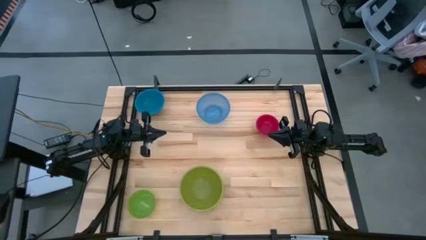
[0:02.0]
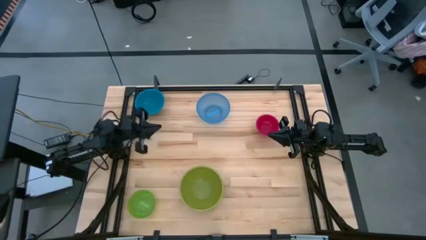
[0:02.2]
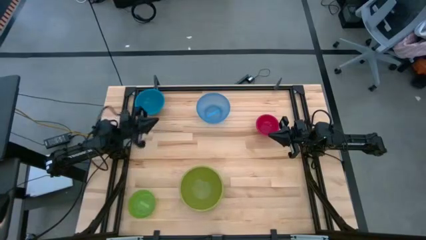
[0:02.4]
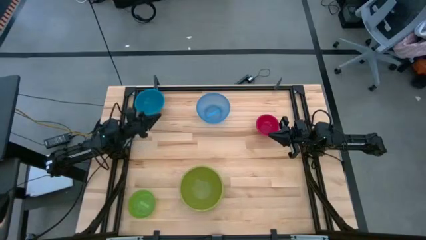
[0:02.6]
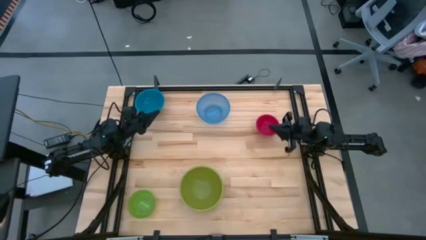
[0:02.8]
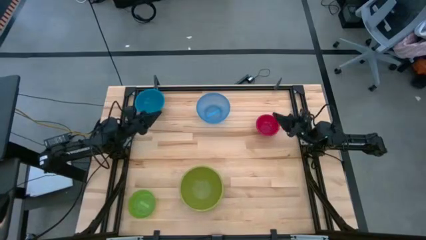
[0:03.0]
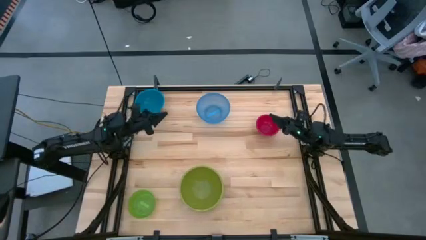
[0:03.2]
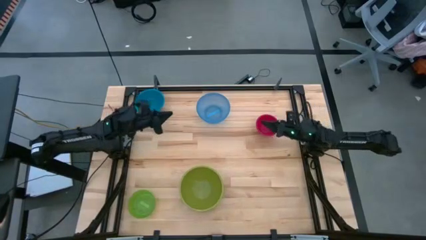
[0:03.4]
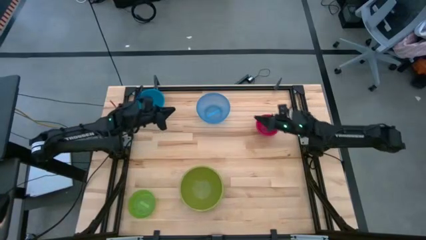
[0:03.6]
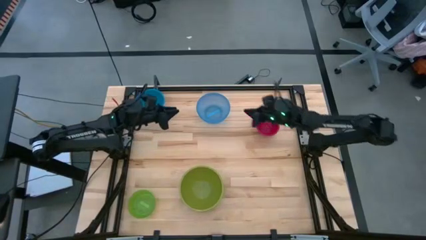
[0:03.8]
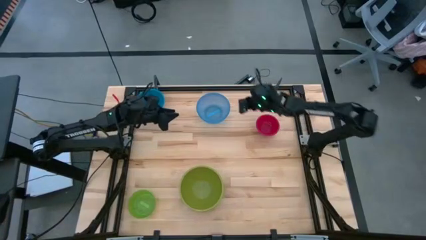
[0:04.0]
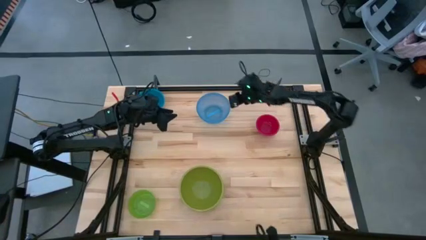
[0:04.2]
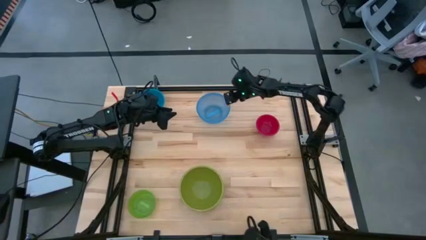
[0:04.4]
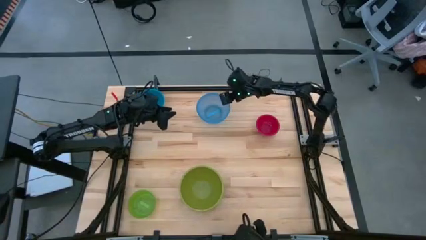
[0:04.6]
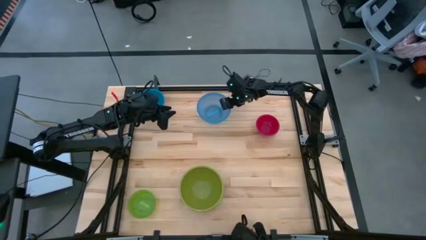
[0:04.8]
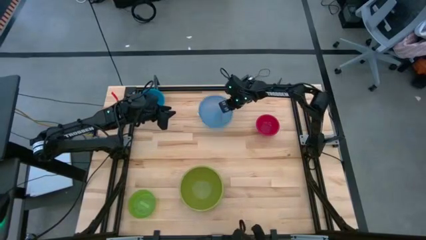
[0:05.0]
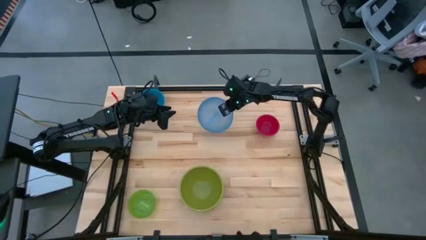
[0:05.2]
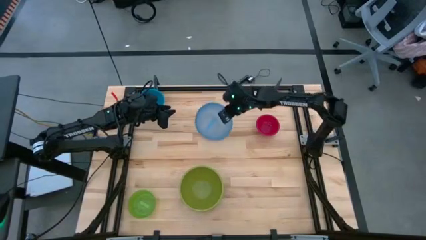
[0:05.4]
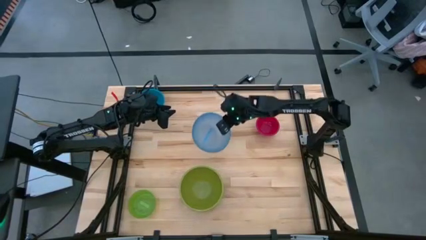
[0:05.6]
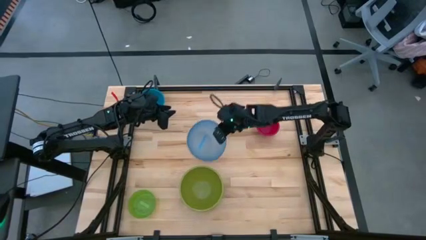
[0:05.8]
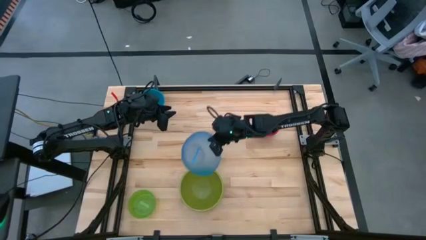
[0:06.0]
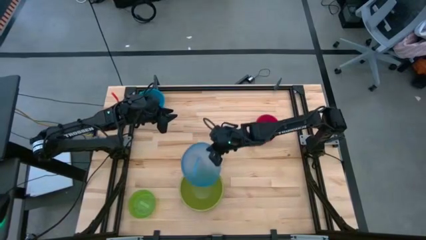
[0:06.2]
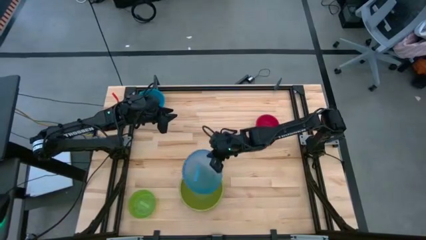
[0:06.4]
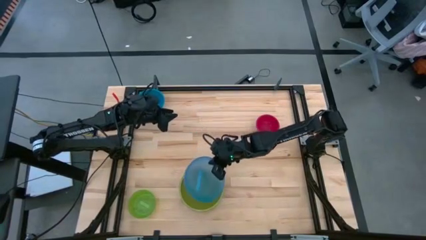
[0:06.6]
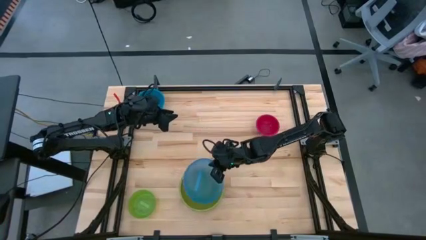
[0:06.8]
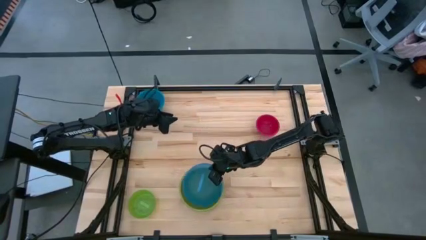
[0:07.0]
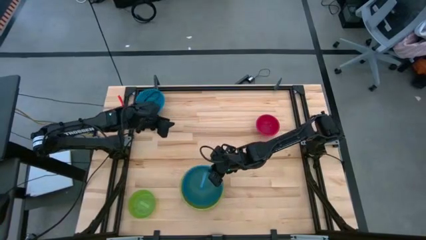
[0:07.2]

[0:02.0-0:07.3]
Stack the blue bowl into the green bowl

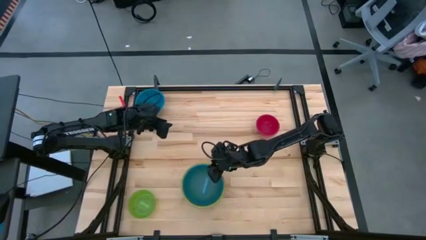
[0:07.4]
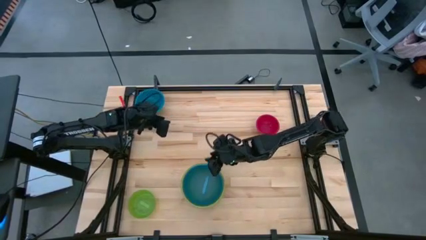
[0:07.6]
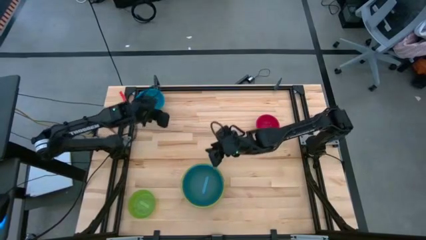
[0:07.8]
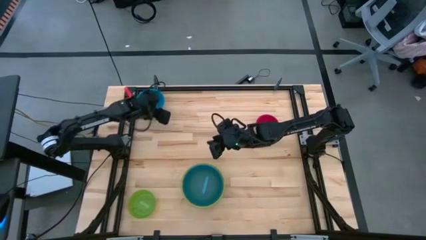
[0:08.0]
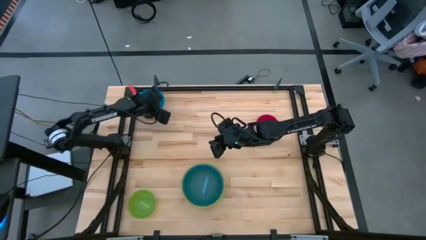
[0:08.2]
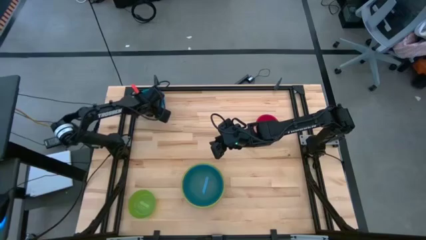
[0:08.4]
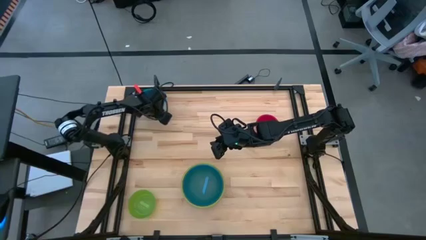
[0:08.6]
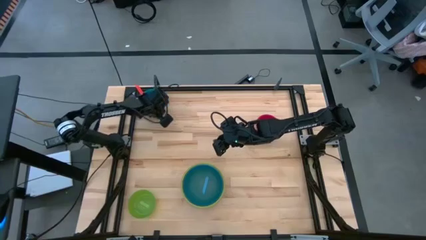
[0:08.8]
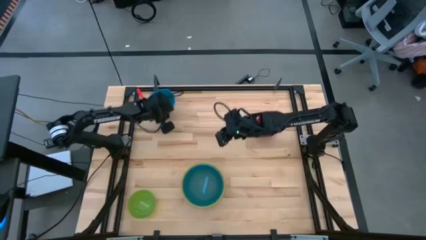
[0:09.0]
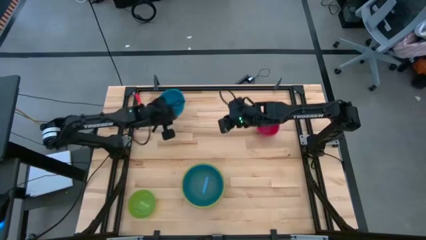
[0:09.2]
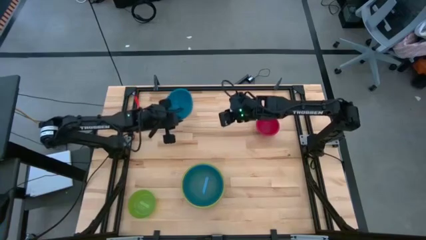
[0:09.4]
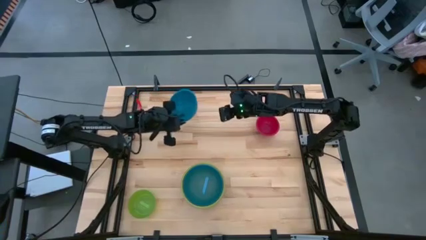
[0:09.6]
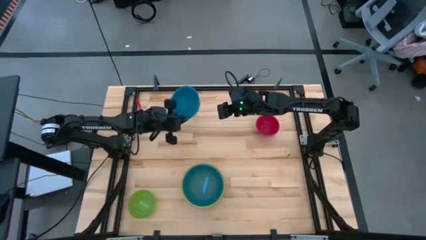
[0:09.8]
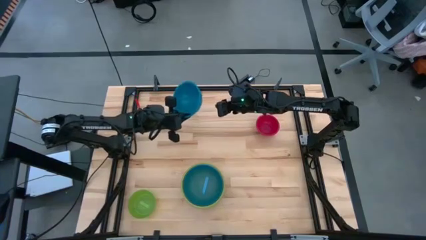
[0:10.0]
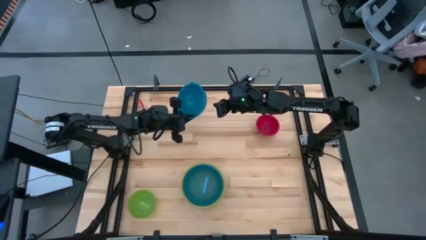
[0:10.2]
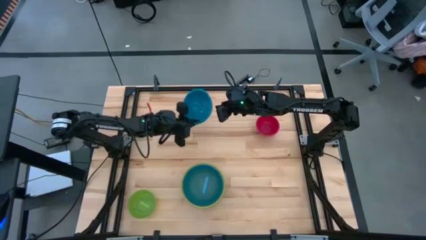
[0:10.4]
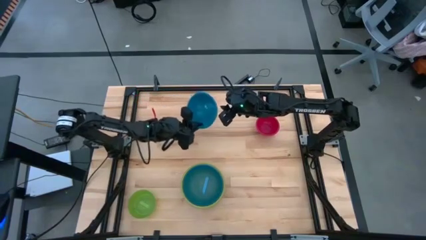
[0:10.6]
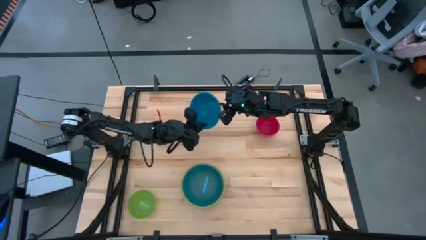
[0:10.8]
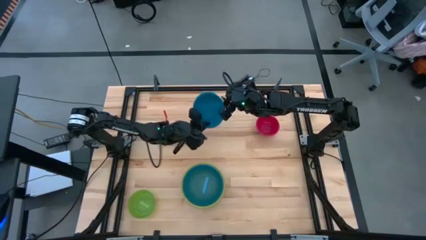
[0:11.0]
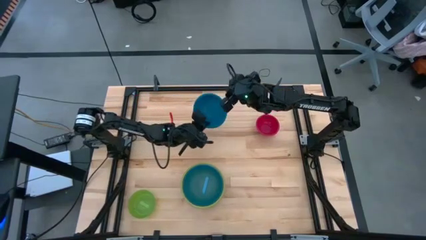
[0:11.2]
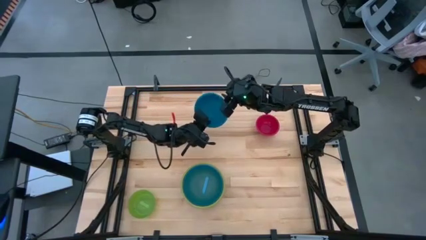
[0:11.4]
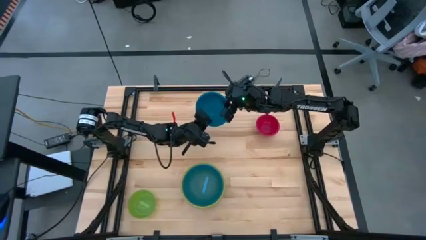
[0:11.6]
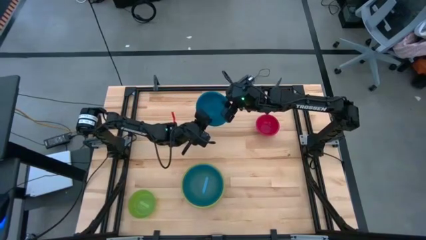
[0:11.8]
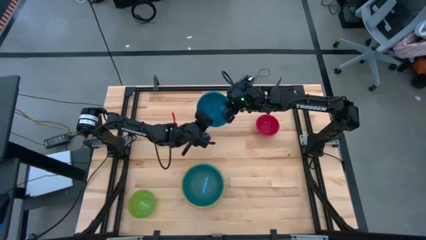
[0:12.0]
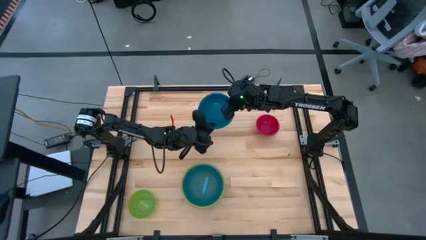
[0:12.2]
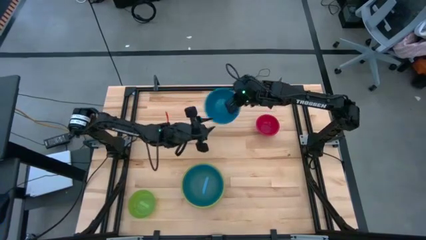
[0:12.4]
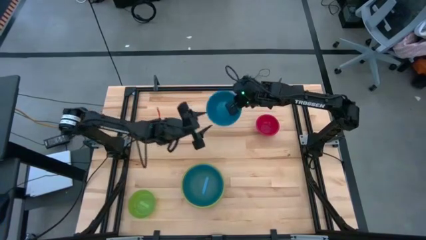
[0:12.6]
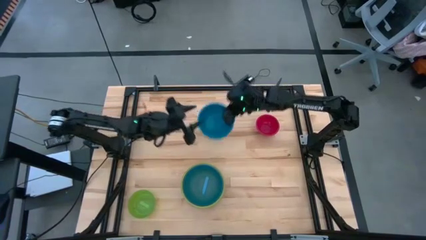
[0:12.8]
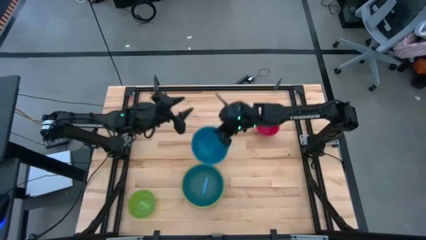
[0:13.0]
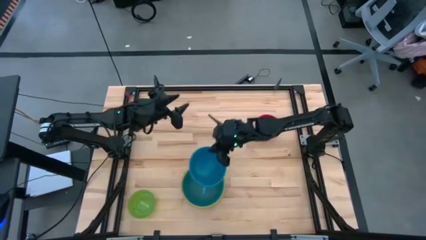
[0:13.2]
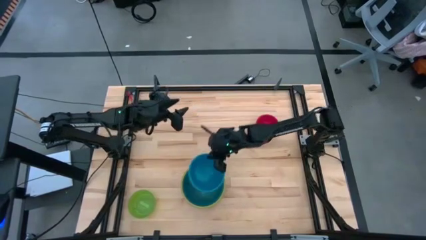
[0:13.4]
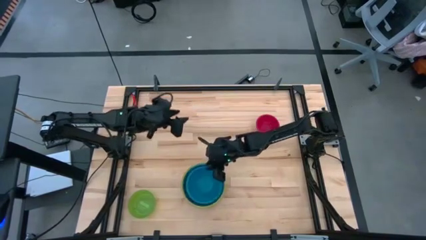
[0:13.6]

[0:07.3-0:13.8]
Stack the dark blue bowl into the blue bowl

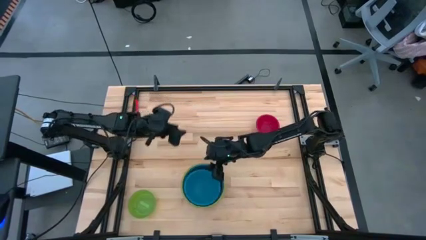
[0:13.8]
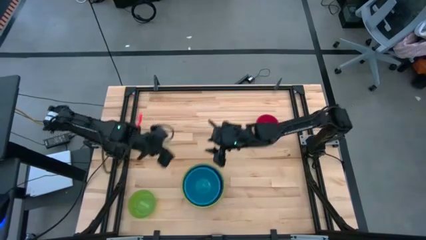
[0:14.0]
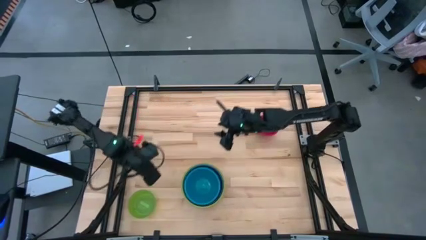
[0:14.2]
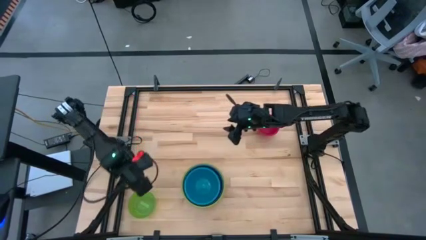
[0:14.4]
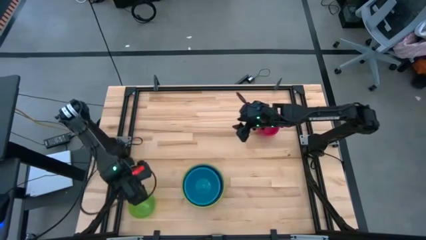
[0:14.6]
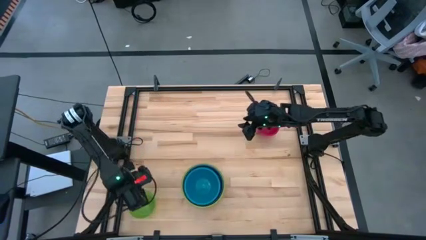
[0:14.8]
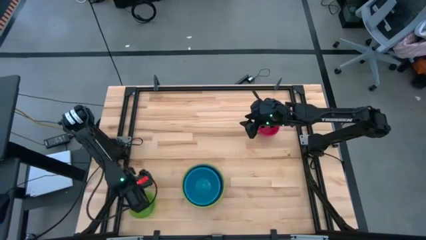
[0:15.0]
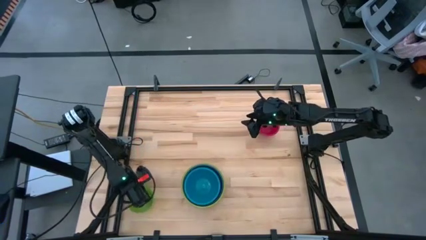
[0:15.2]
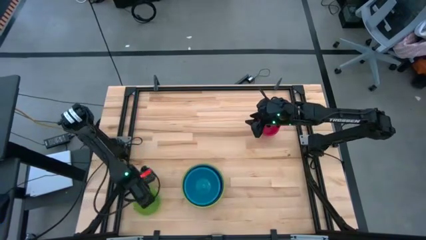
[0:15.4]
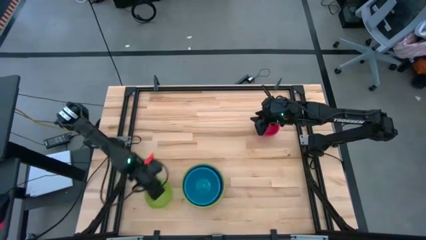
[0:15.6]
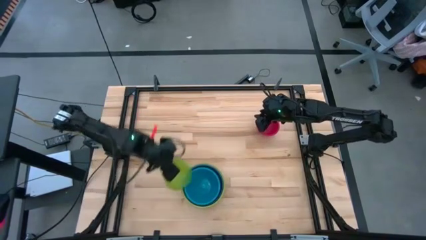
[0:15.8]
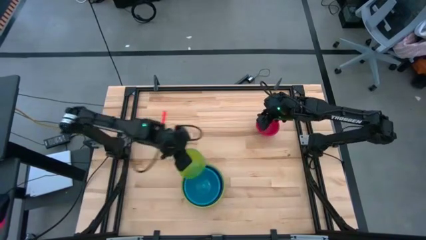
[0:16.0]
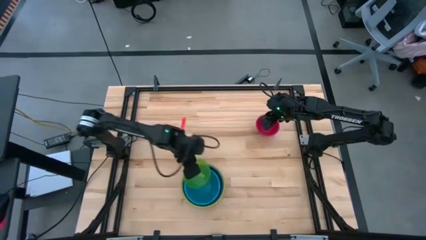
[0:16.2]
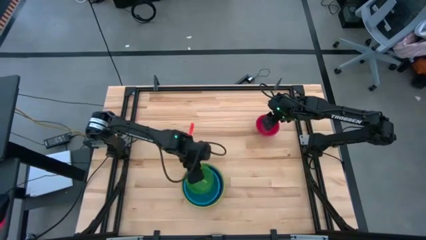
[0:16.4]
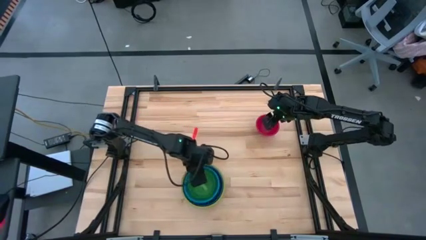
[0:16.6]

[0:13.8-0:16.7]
Stack the green bowl into the dark blue bowl

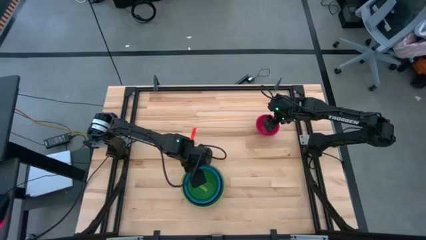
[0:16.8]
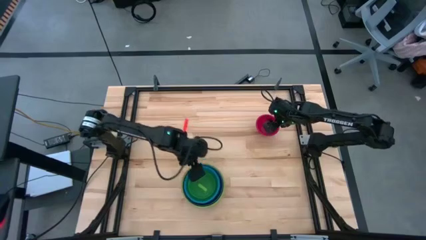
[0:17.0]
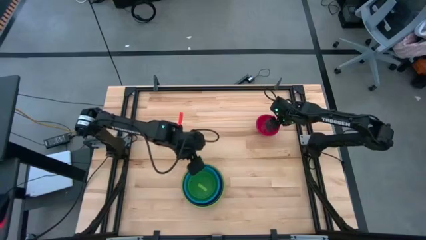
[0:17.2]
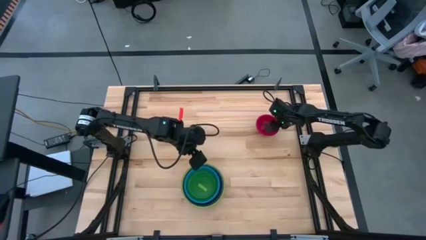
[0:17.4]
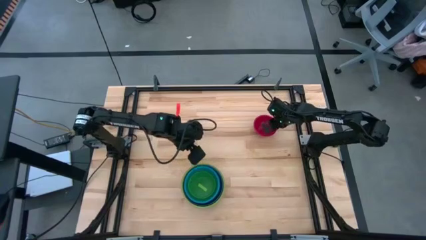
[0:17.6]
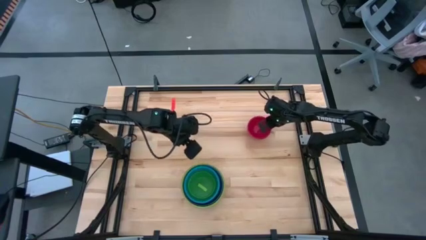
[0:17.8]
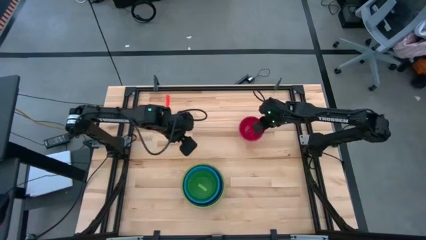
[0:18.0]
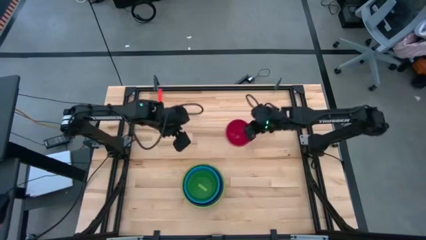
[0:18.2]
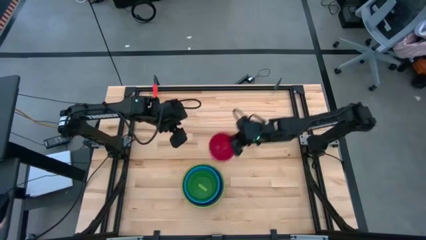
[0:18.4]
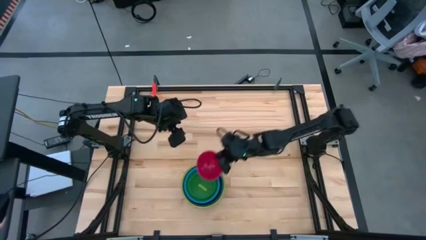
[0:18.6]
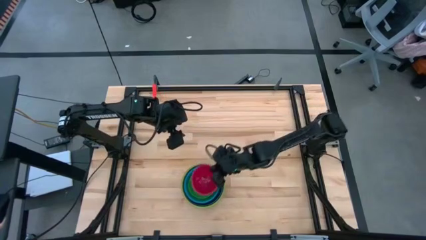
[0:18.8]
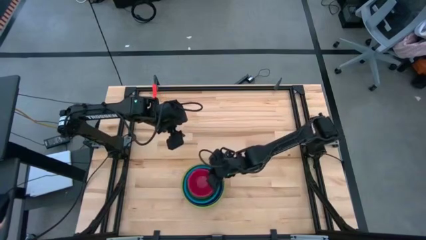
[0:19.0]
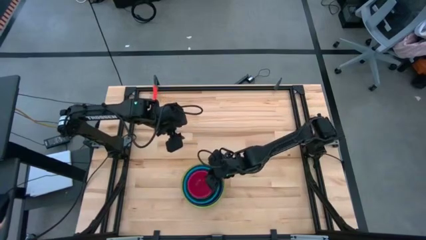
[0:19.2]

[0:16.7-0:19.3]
Stack the pink bowl into the green bowl
